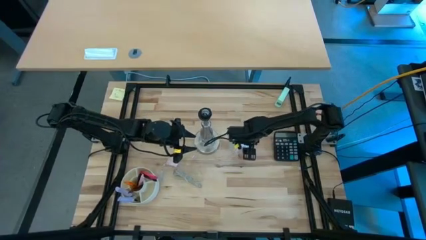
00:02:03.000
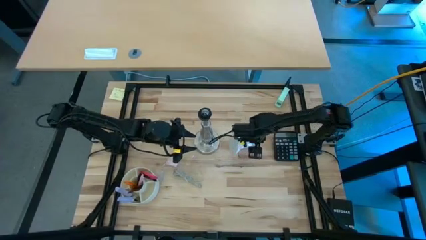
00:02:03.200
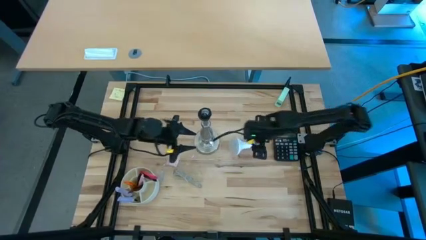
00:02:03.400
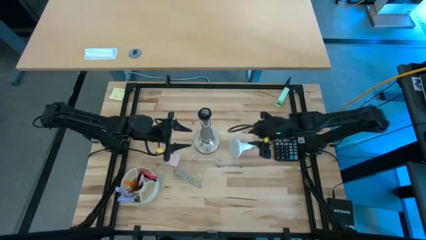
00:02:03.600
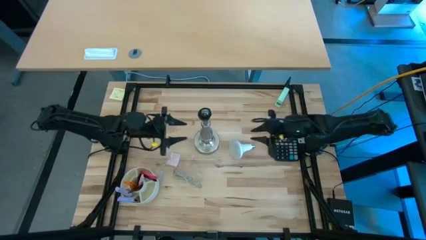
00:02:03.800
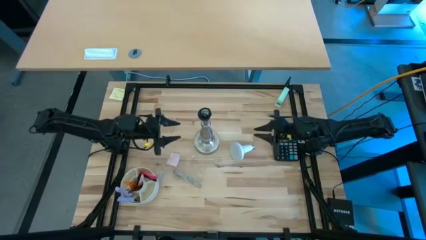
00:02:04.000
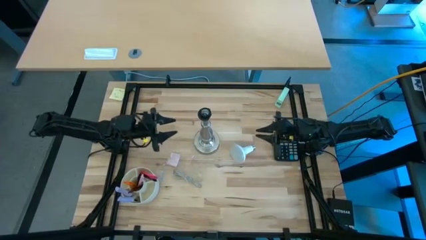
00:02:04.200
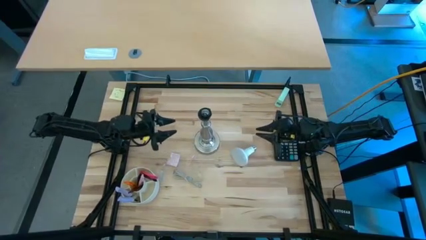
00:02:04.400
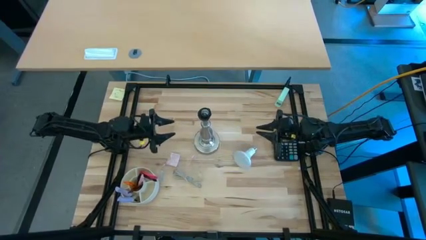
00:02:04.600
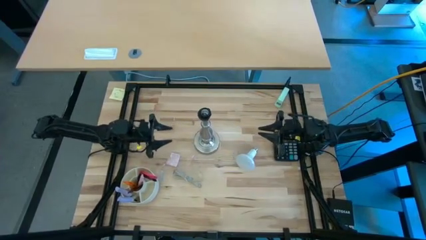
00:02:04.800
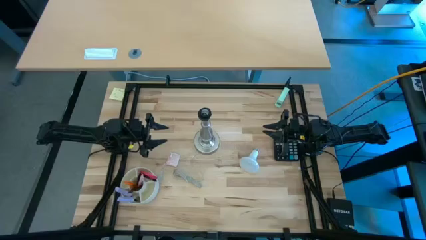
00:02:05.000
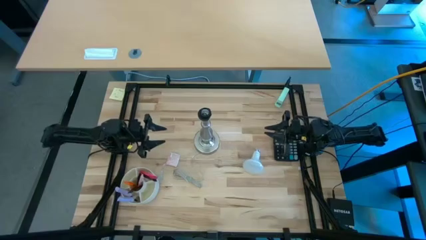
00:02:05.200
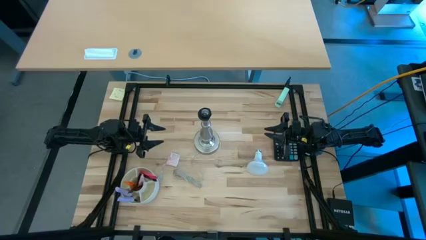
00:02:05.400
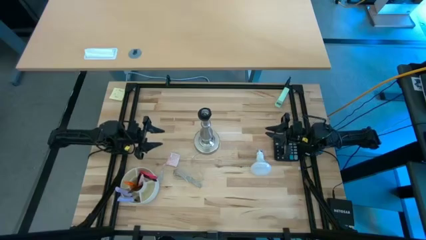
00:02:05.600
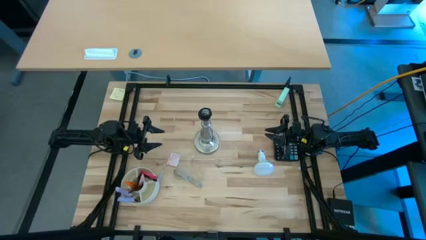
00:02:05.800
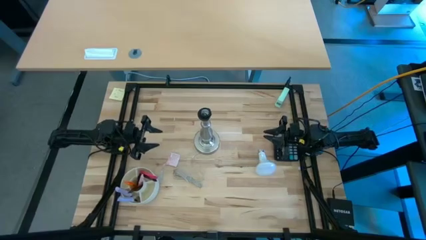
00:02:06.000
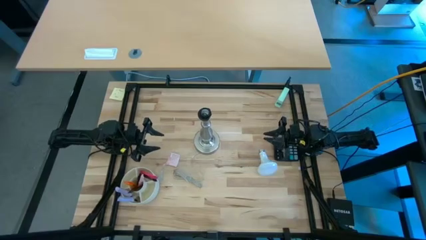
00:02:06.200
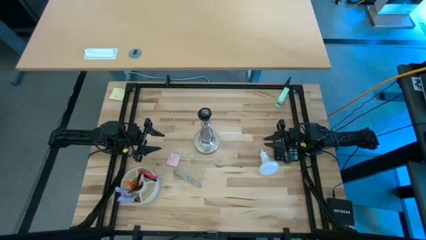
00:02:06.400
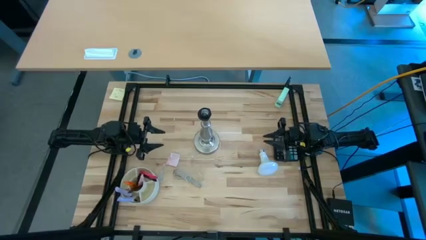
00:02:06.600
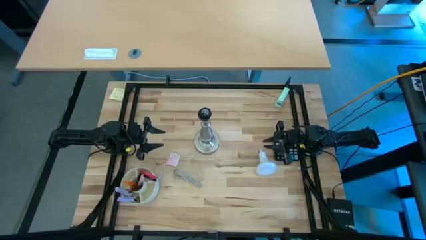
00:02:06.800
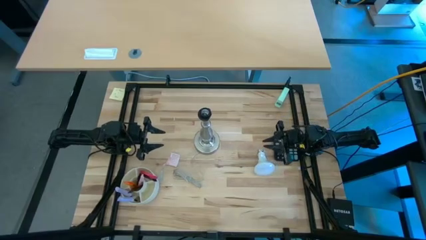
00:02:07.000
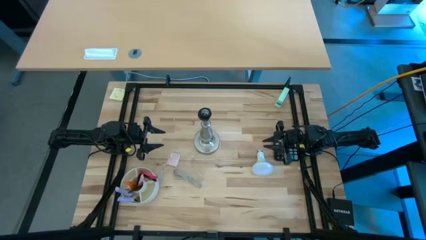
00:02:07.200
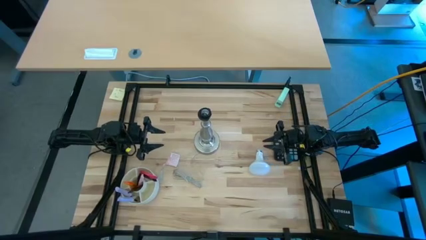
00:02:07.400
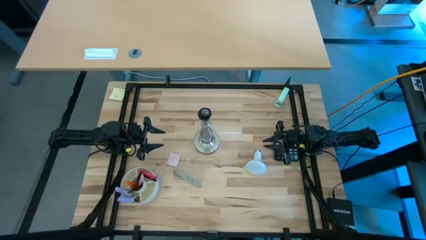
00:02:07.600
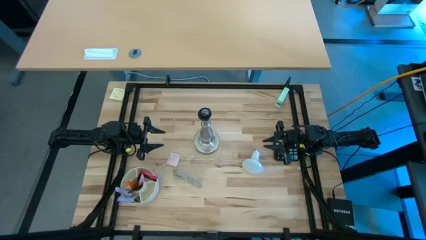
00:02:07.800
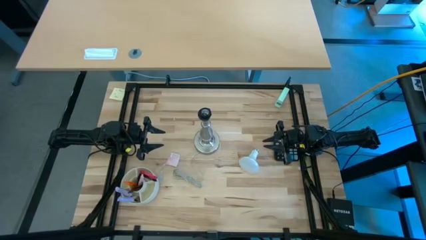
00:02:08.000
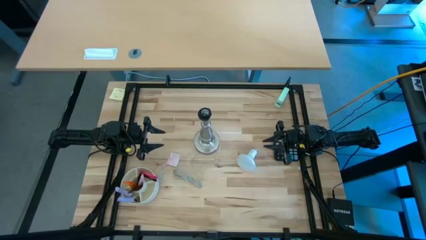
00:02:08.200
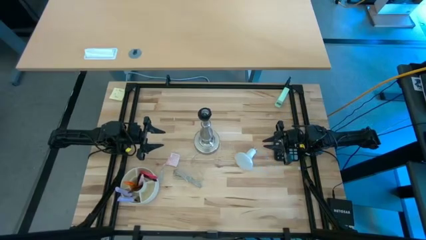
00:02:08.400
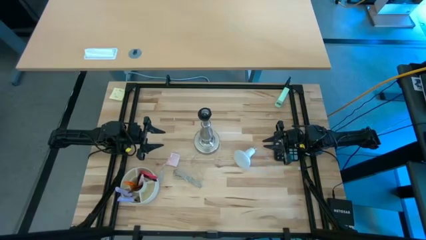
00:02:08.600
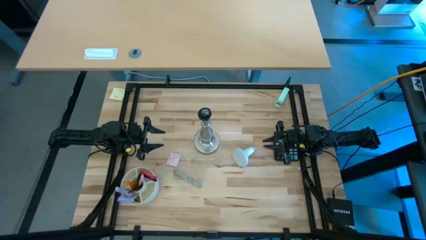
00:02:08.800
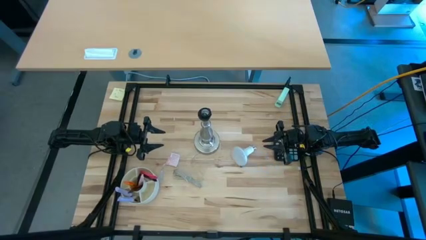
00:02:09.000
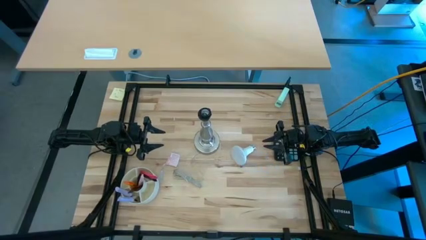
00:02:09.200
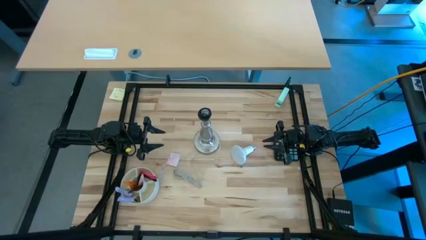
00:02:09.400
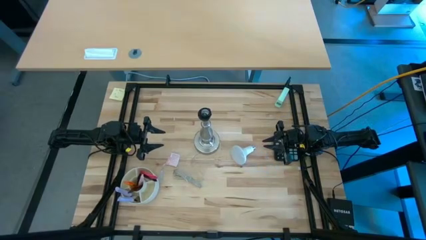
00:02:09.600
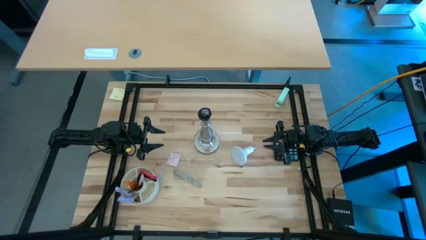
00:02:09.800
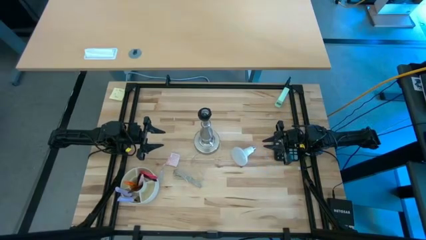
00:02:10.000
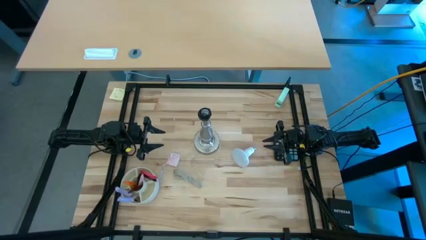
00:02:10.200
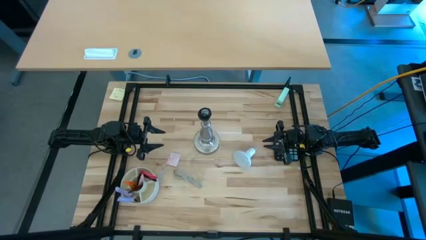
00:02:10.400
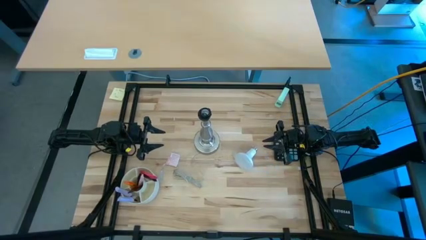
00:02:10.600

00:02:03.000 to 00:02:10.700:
Task: Screw lightbulb
Return to Home Position

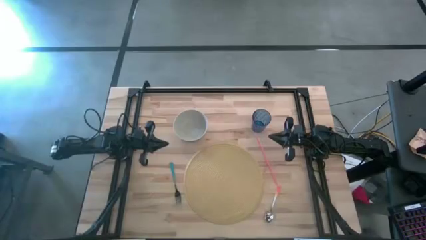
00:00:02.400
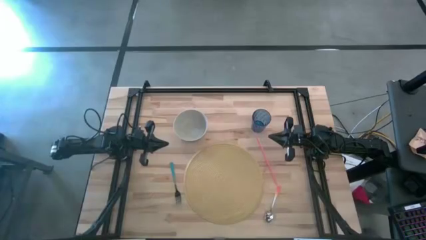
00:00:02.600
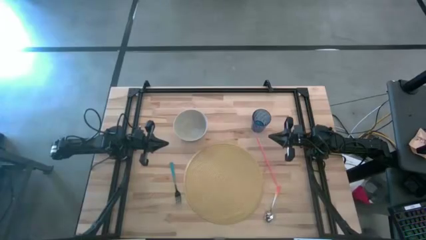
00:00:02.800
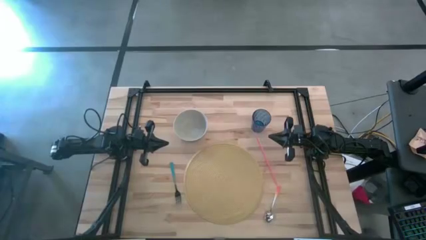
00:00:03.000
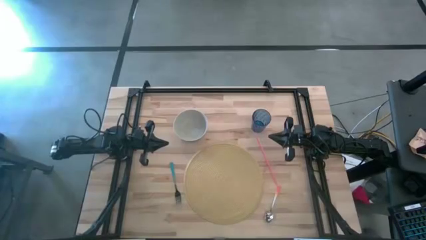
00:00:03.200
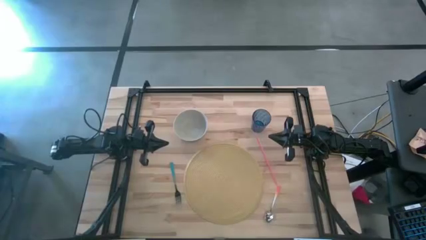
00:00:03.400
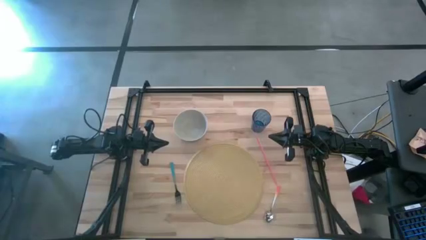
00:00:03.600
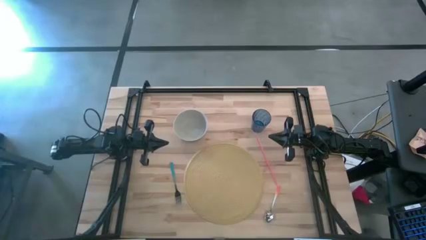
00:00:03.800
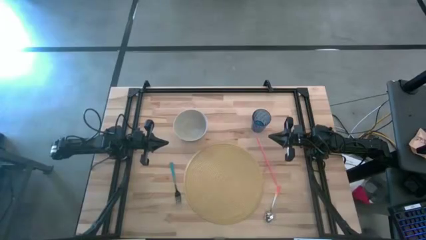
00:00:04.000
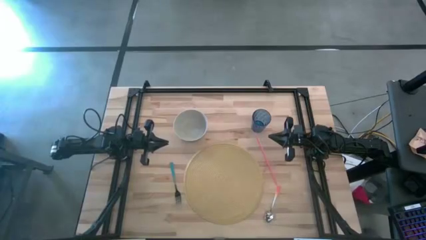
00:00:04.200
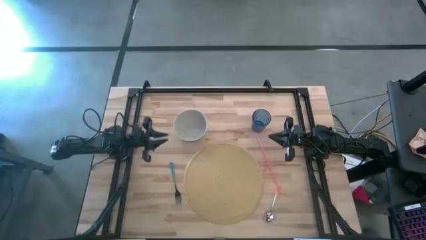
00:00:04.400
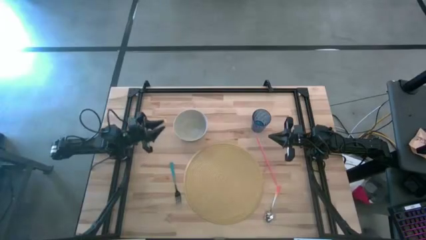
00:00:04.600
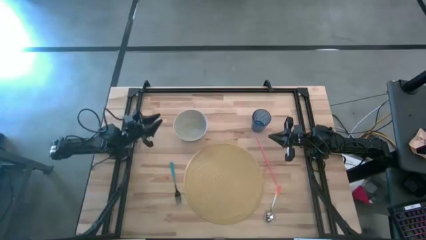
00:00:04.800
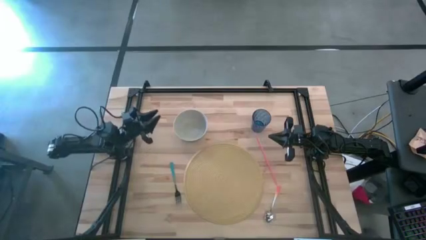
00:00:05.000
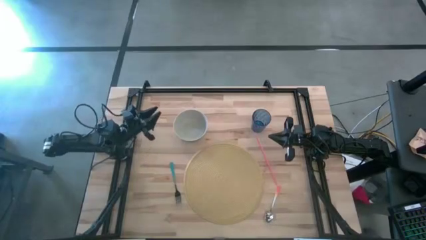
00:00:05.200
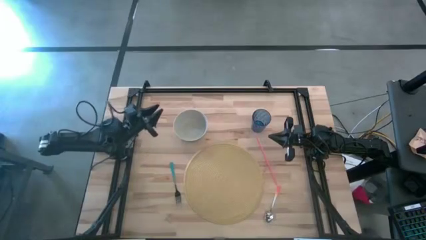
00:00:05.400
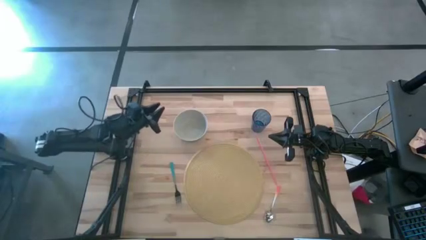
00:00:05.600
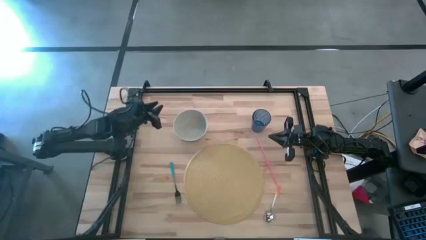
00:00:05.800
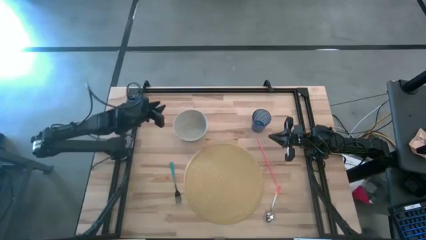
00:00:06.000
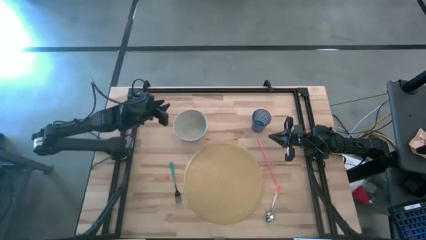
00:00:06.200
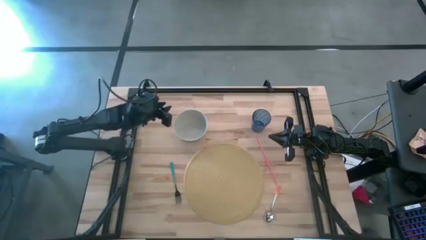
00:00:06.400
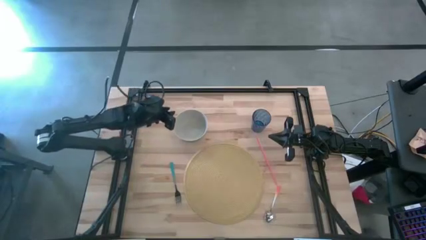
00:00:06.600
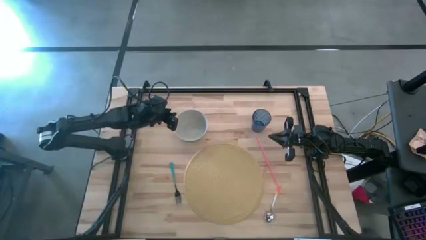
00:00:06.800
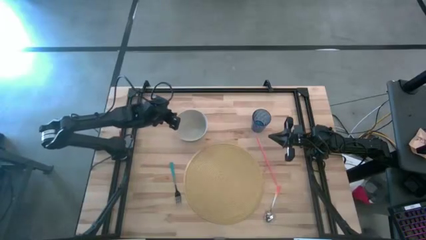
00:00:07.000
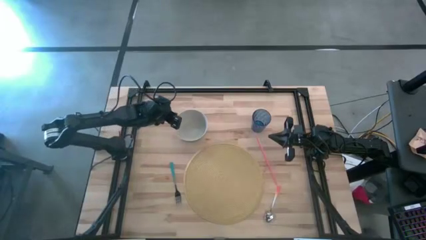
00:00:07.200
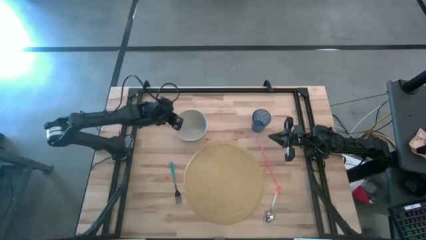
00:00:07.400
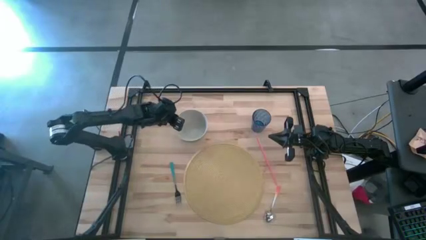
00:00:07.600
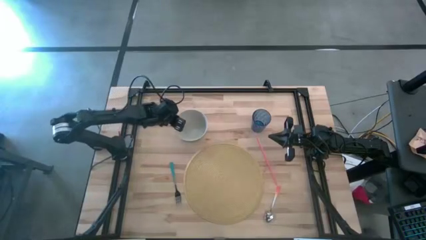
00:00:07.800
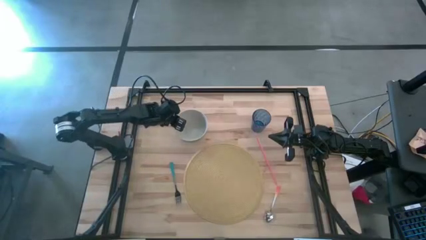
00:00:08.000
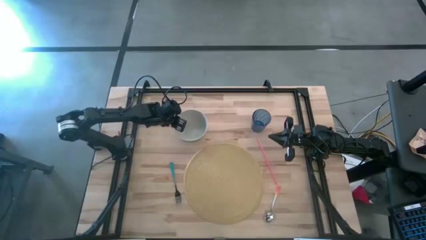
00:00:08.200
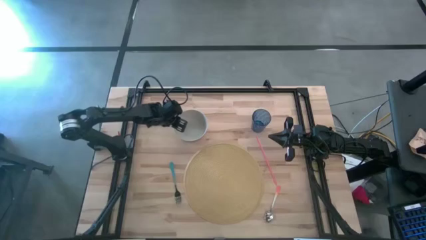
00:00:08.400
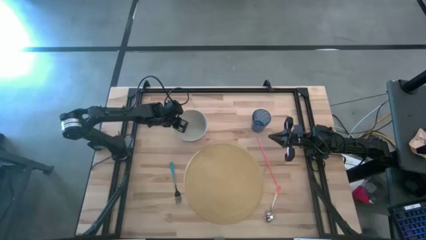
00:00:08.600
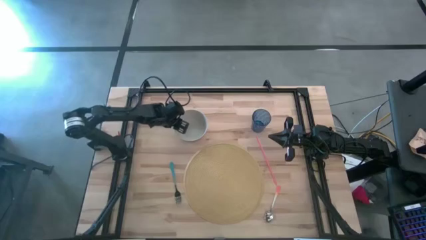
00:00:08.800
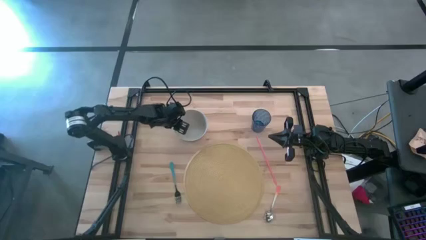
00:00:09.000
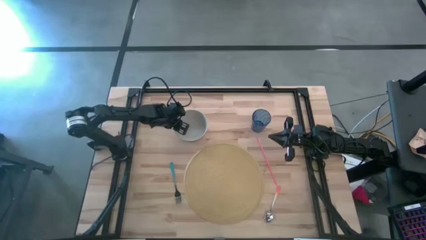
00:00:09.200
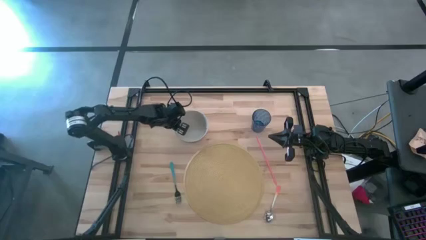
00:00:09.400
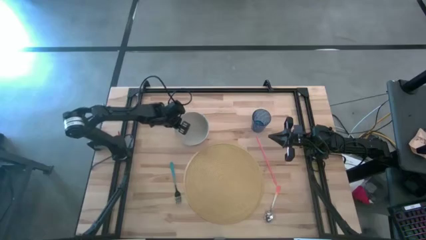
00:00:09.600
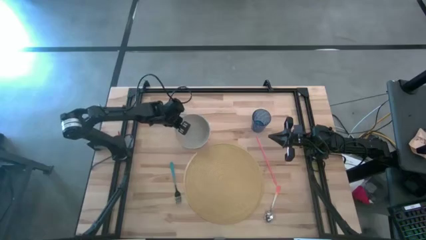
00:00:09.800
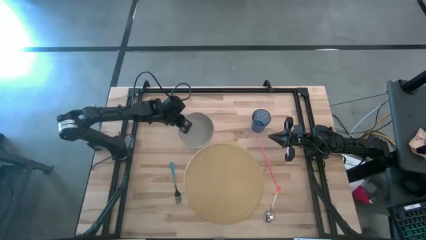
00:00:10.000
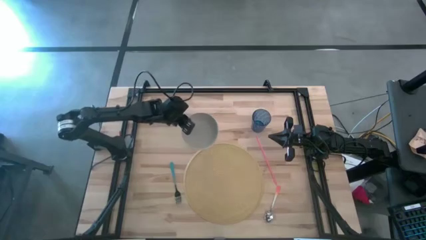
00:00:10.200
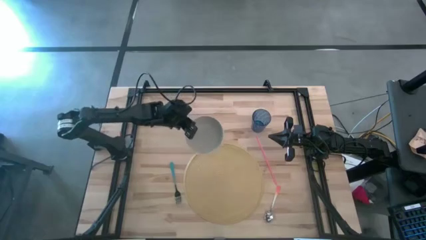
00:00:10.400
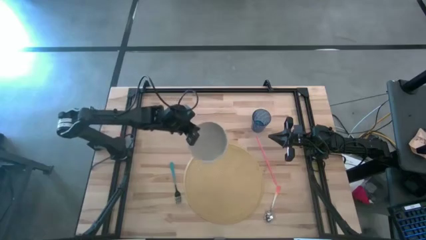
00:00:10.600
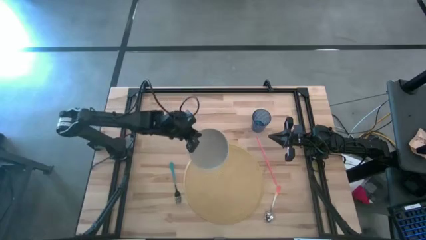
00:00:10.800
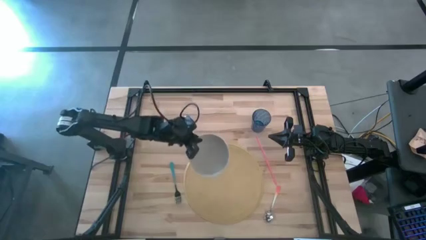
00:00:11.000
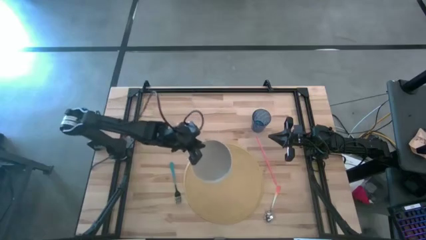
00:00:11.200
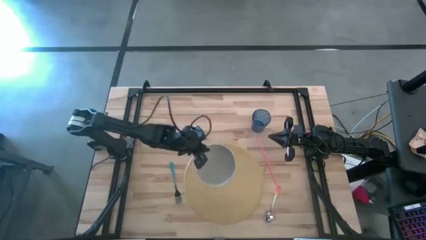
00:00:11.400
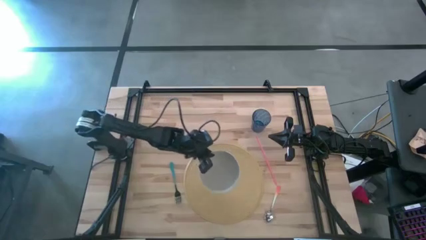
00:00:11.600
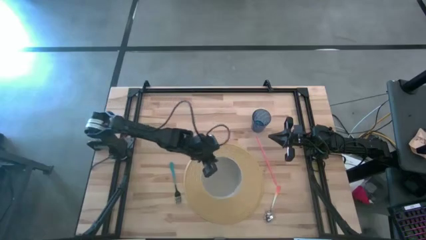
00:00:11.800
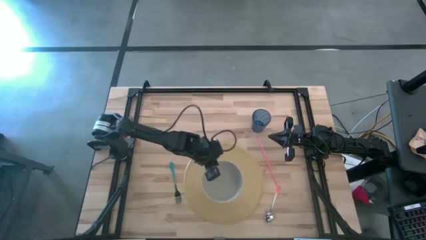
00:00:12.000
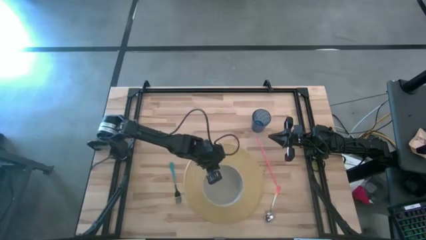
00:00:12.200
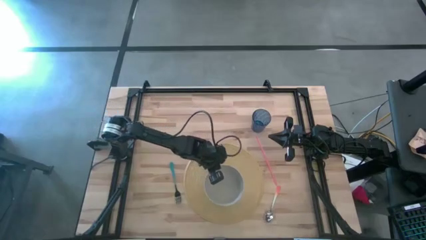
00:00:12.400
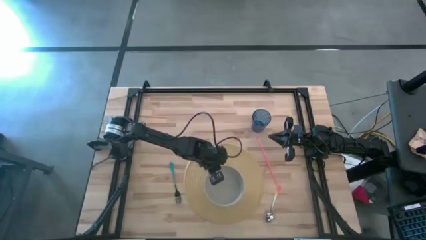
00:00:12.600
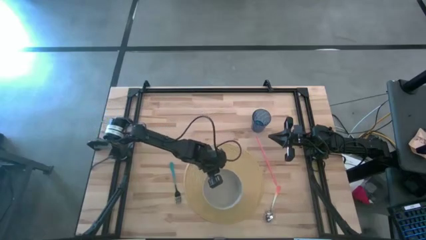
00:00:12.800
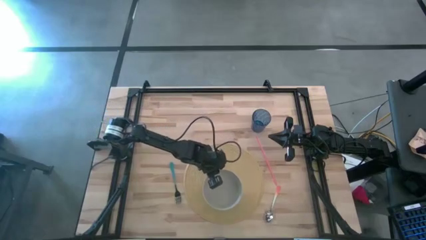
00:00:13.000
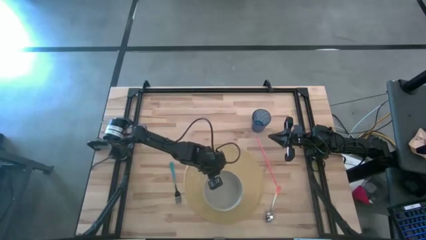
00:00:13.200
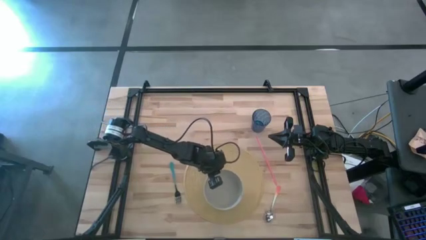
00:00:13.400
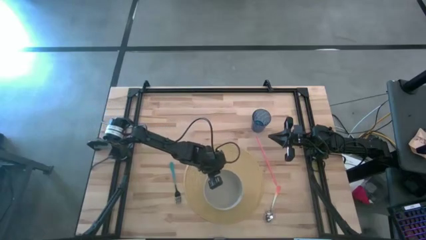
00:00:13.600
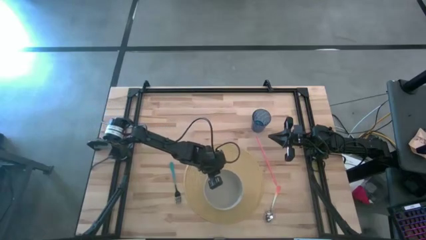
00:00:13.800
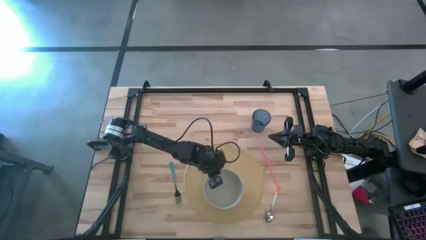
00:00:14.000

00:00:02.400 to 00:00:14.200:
Task: Pick & Place Utensil
Put the white bowl in the center of the brown mat
